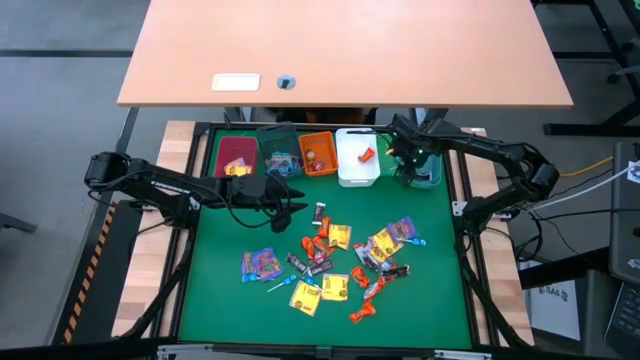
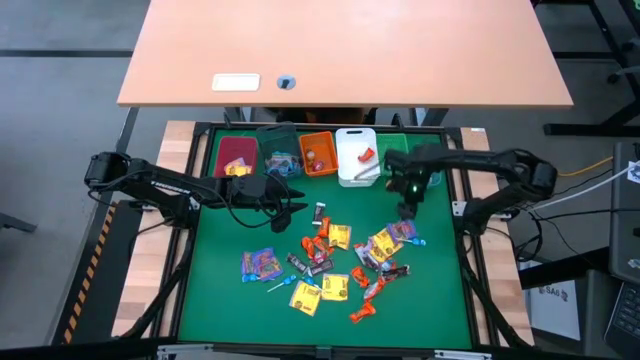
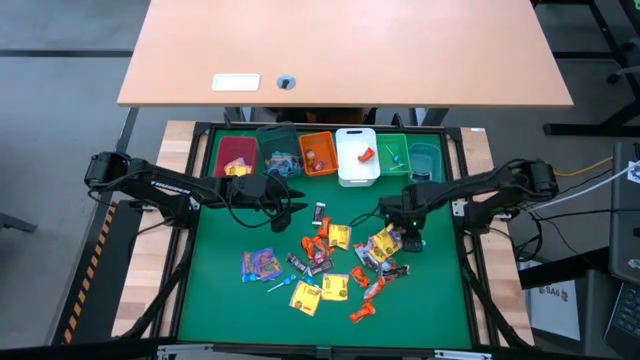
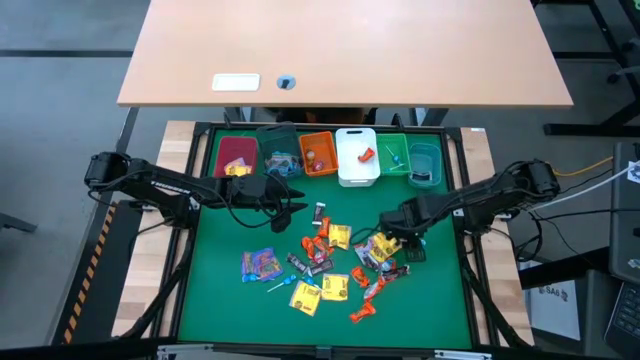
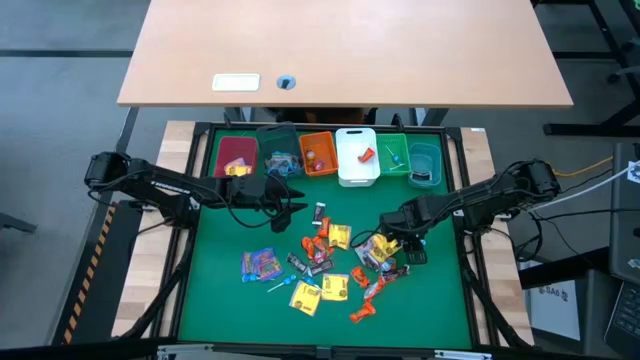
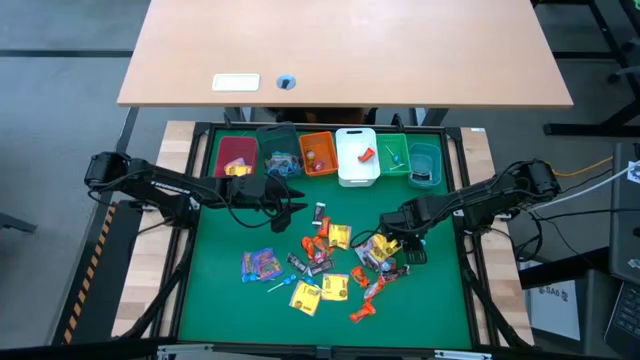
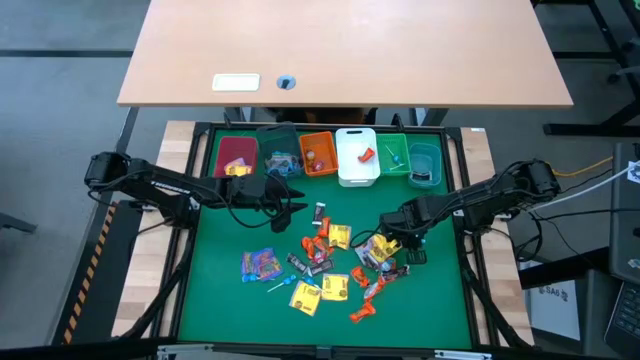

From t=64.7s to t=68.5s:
Task: Sort candy
Put the blue lollipop into the green bin

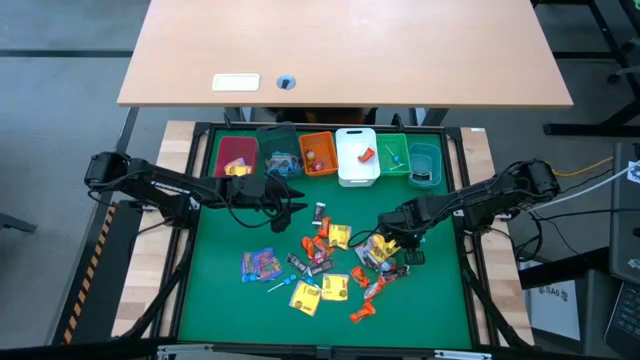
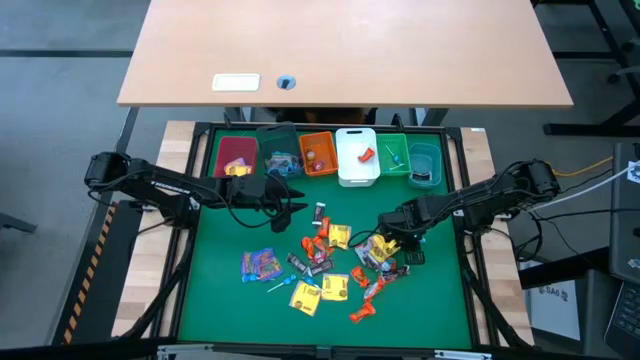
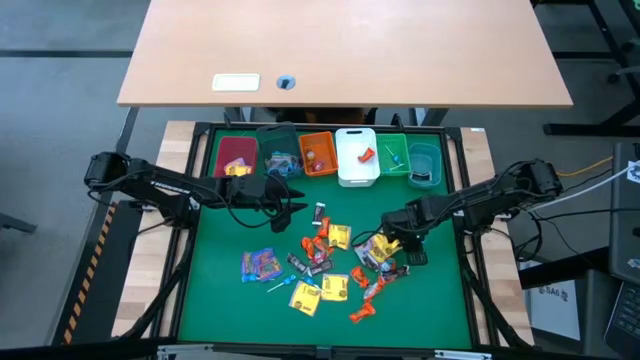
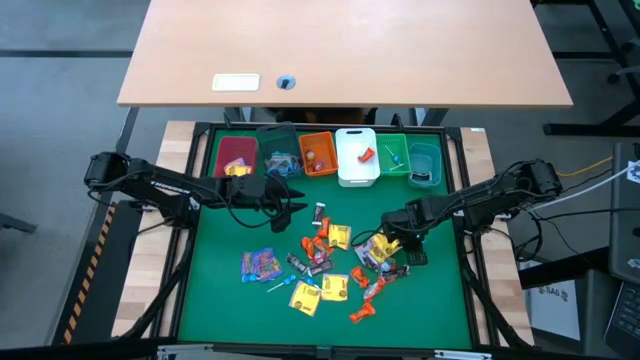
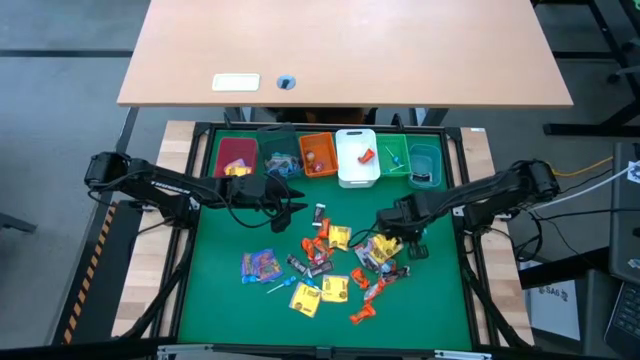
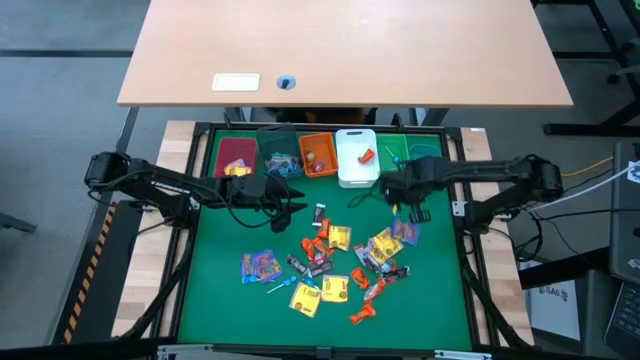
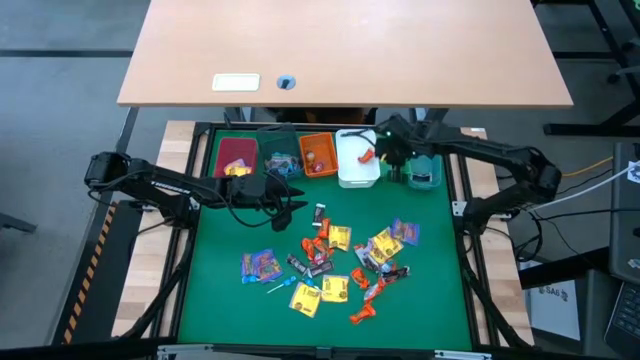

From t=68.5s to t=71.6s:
Put the blue lollipop into the green bin

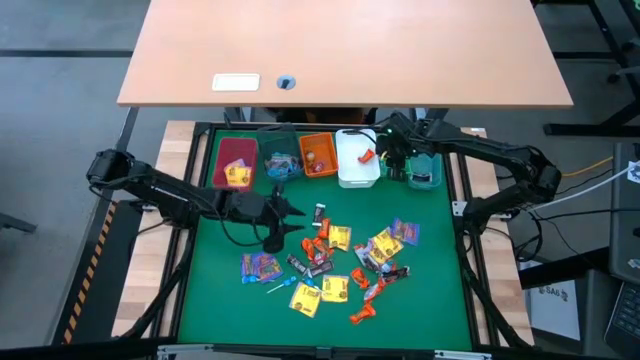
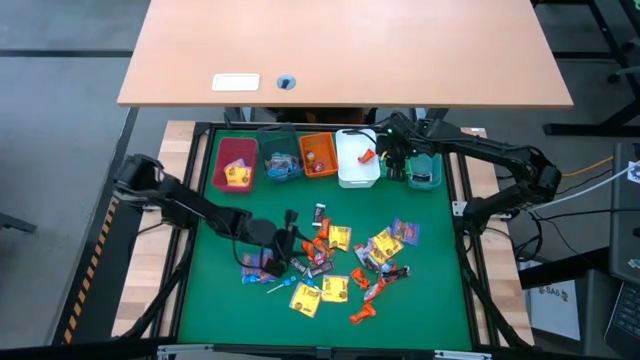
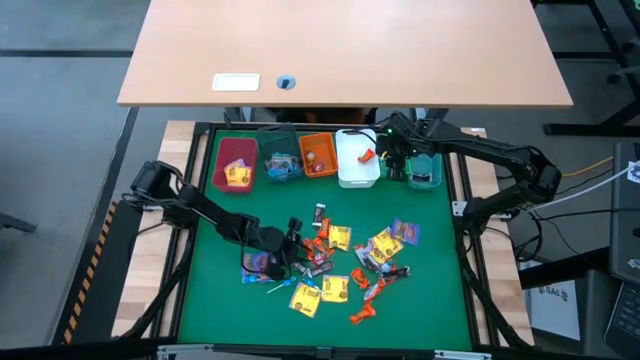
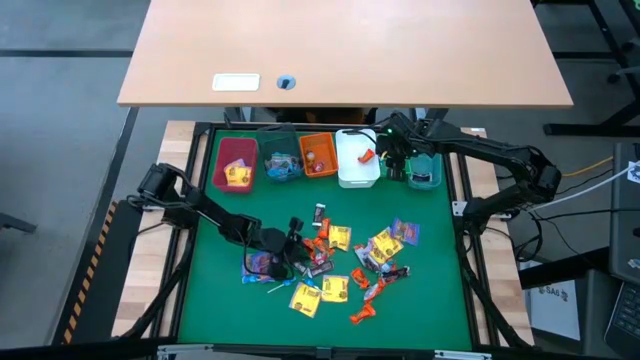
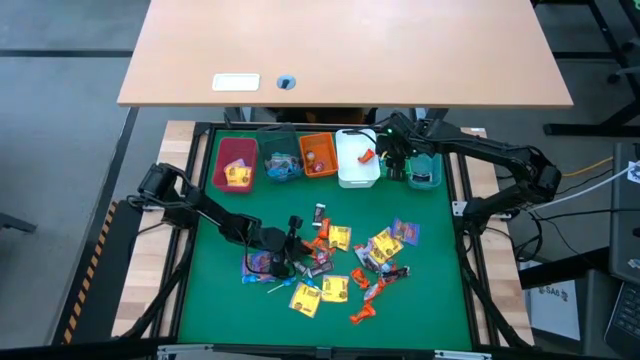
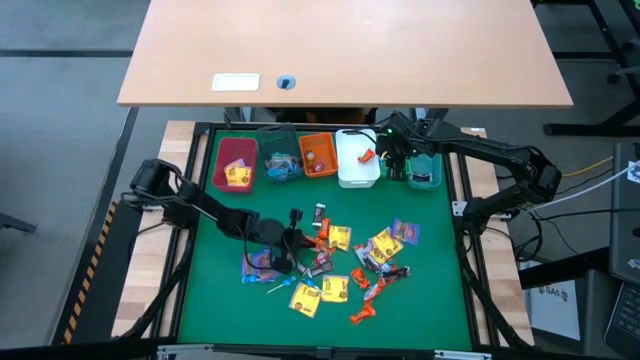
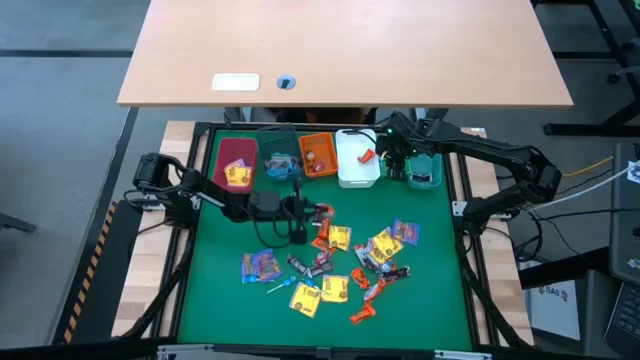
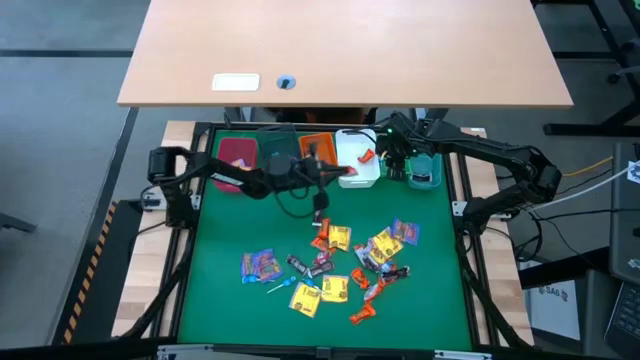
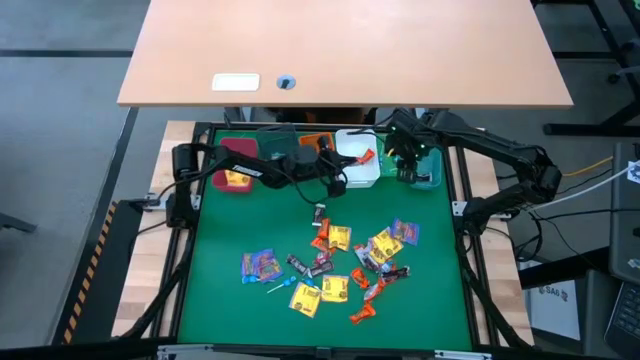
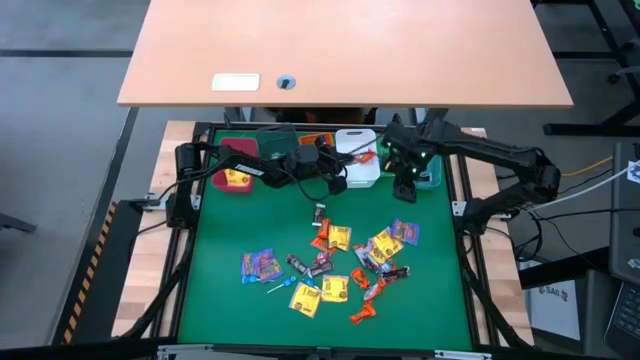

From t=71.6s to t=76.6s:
Put the orange chocolate into the white bin

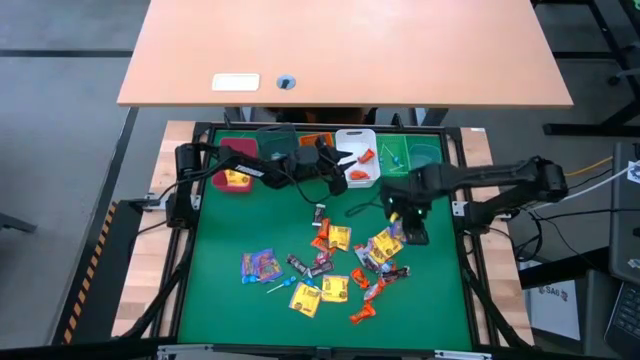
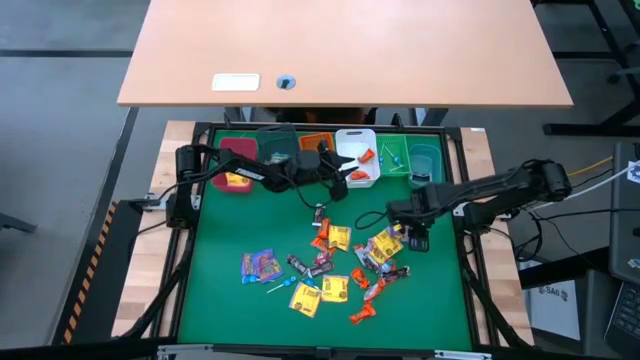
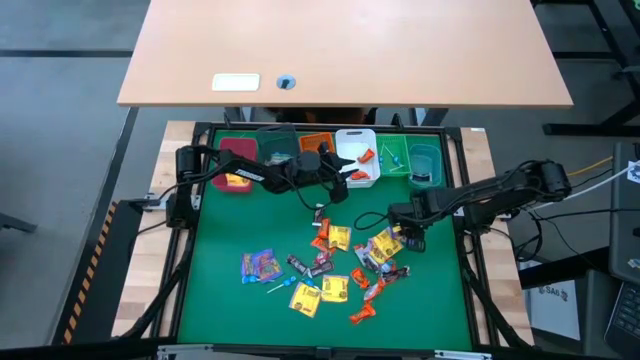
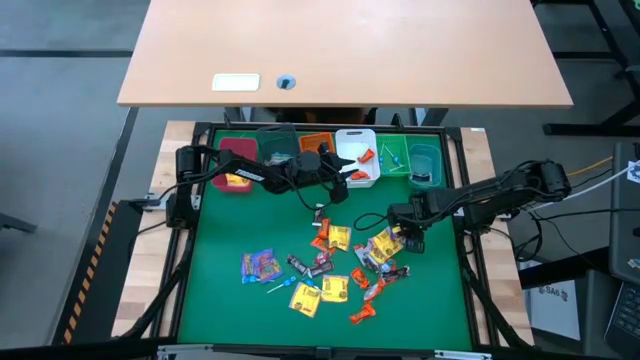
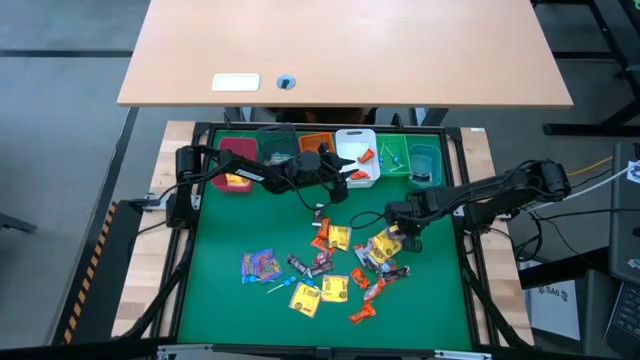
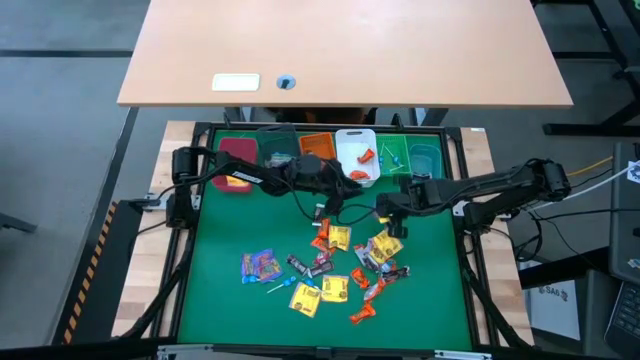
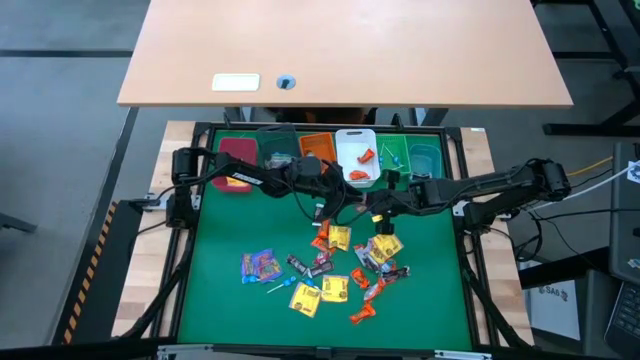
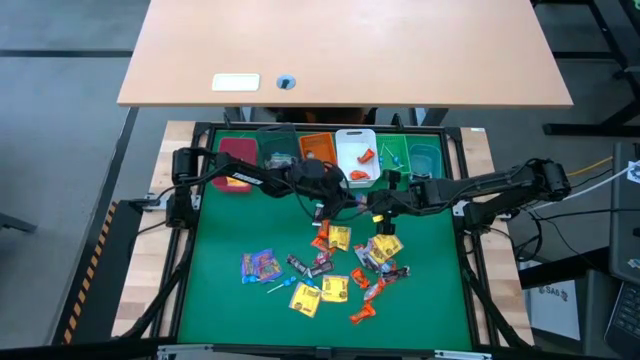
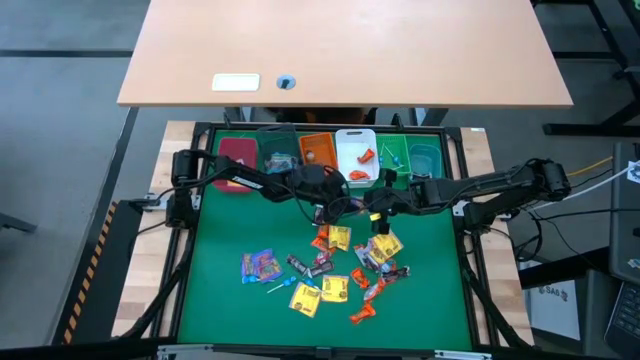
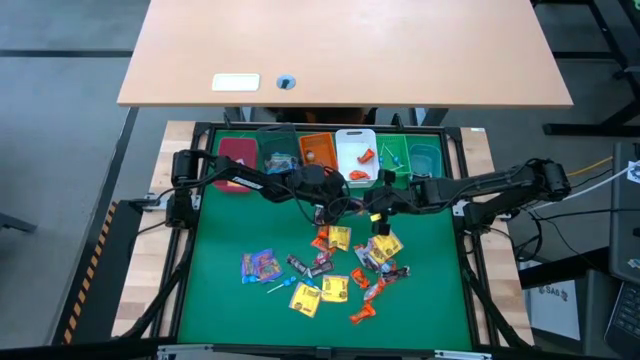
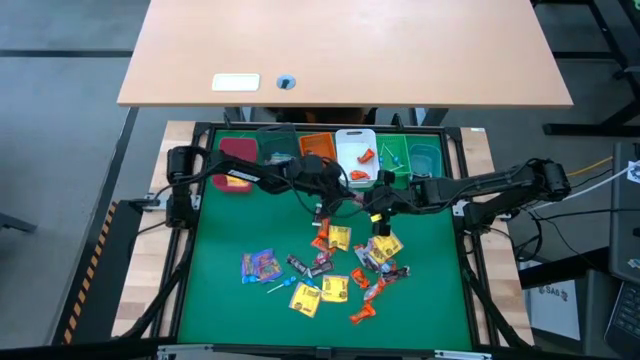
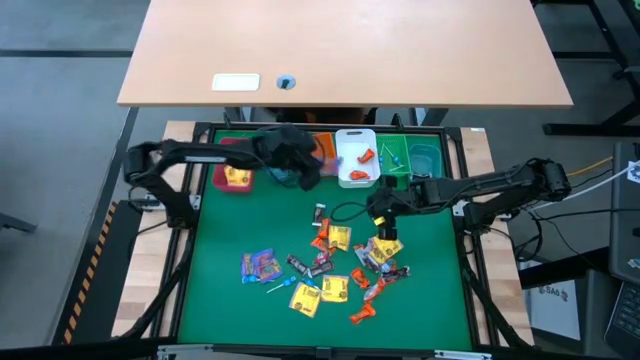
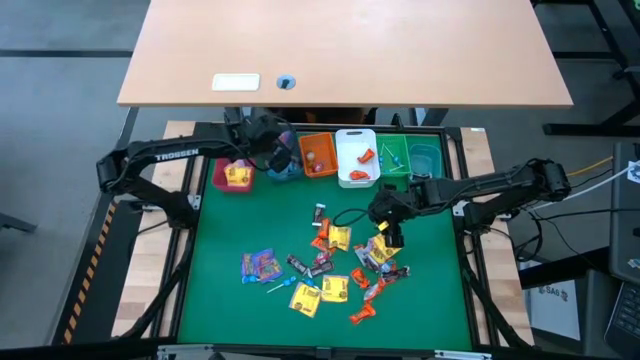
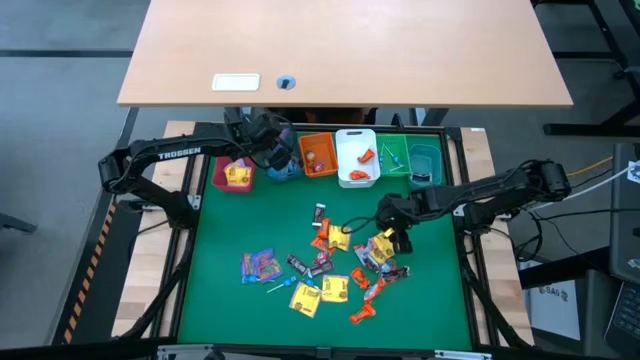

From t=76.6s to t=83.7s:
Put the purple candy into the black bin
